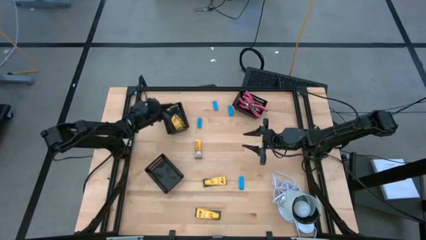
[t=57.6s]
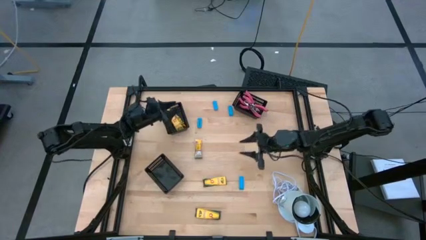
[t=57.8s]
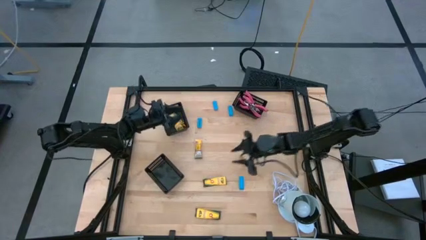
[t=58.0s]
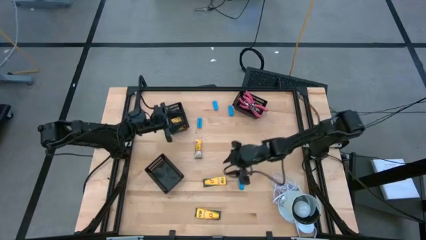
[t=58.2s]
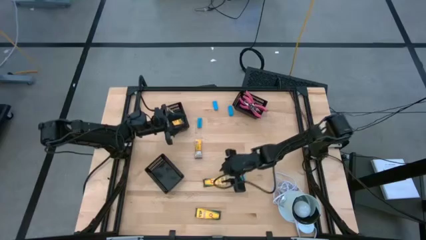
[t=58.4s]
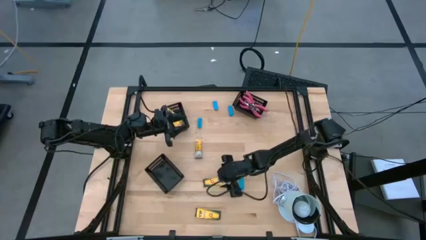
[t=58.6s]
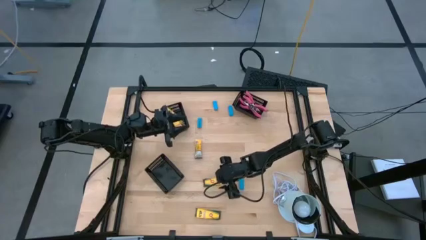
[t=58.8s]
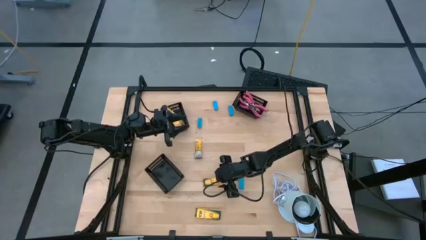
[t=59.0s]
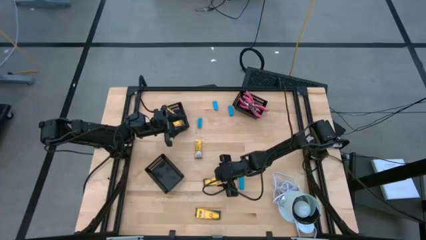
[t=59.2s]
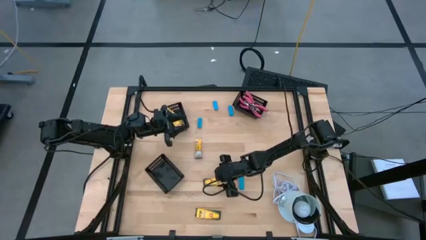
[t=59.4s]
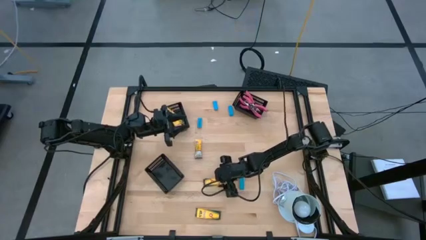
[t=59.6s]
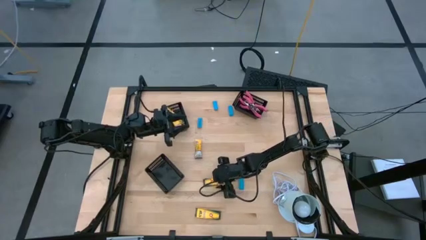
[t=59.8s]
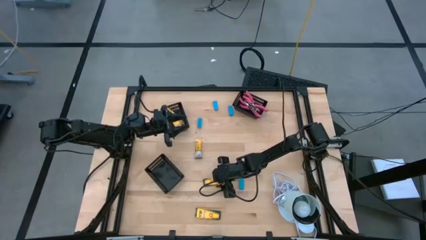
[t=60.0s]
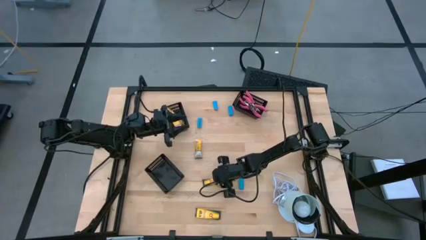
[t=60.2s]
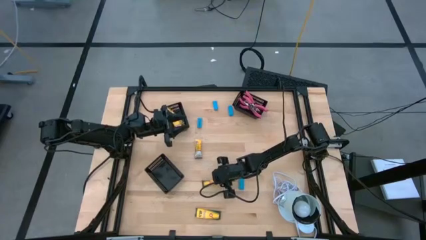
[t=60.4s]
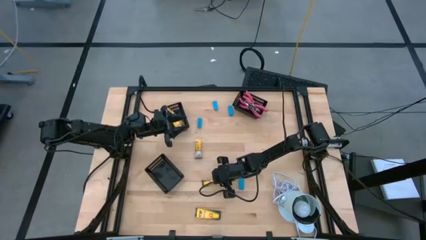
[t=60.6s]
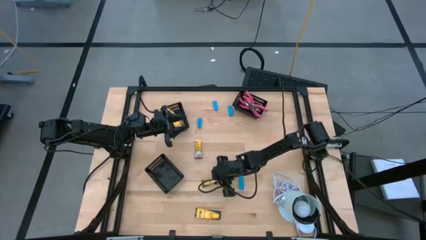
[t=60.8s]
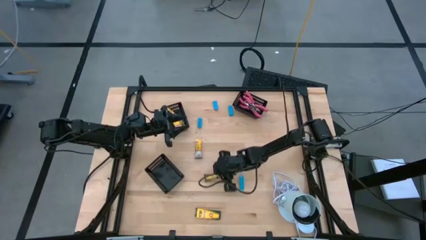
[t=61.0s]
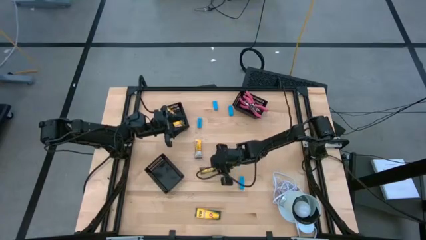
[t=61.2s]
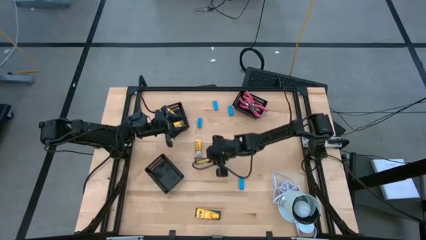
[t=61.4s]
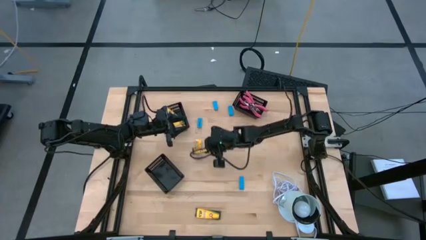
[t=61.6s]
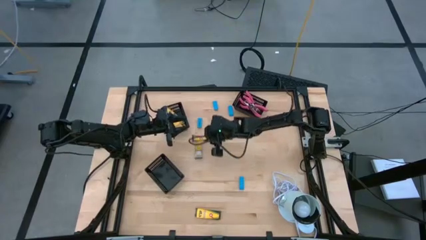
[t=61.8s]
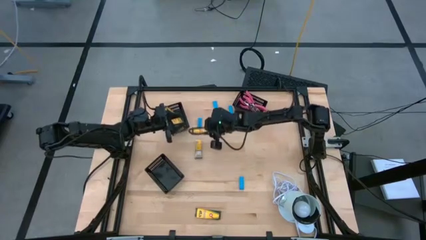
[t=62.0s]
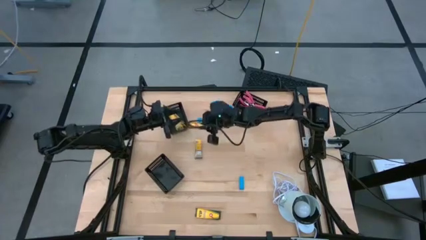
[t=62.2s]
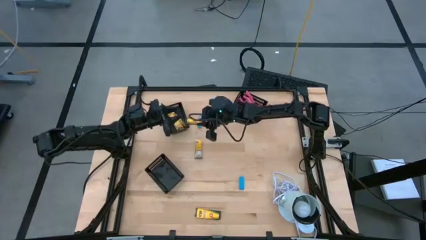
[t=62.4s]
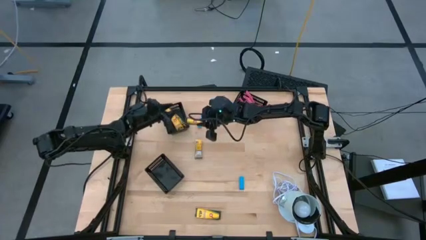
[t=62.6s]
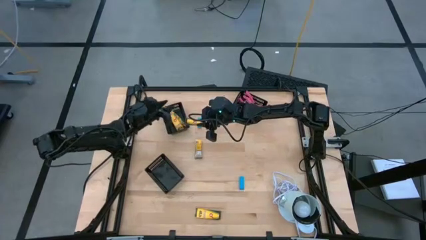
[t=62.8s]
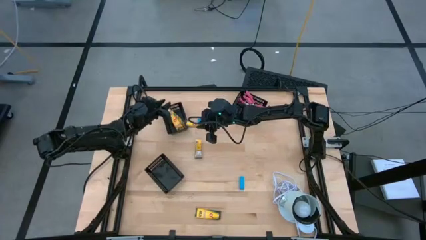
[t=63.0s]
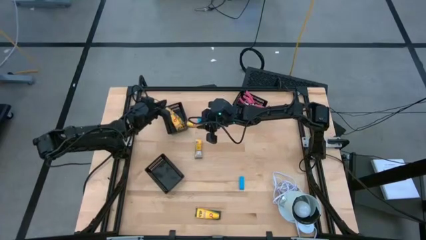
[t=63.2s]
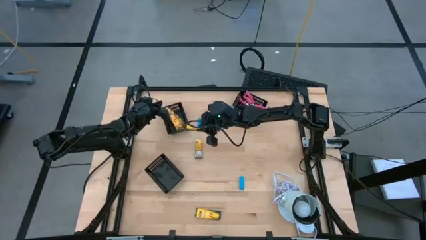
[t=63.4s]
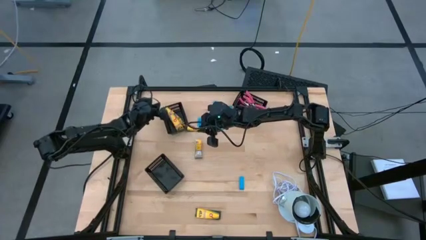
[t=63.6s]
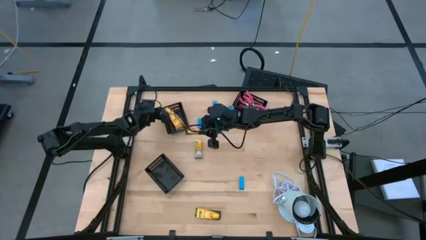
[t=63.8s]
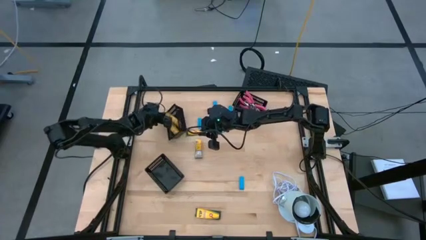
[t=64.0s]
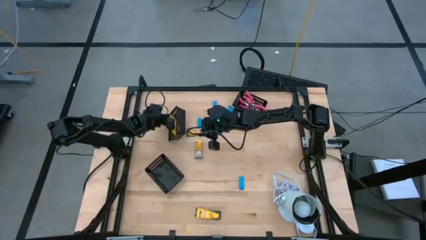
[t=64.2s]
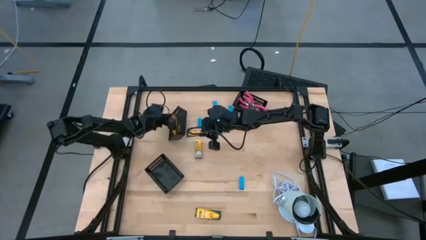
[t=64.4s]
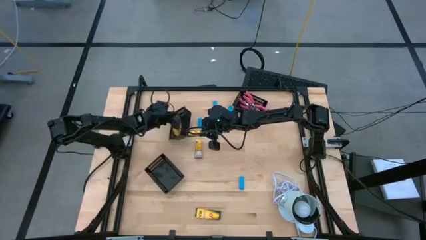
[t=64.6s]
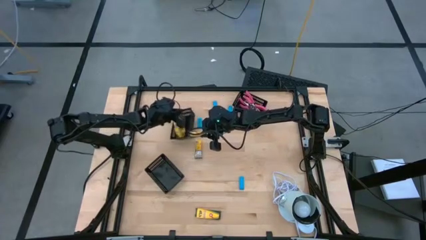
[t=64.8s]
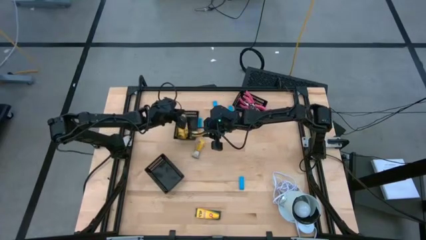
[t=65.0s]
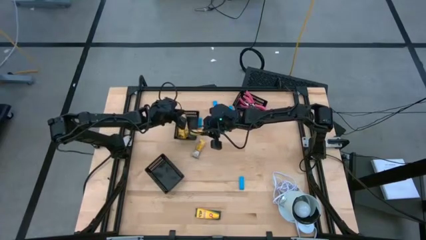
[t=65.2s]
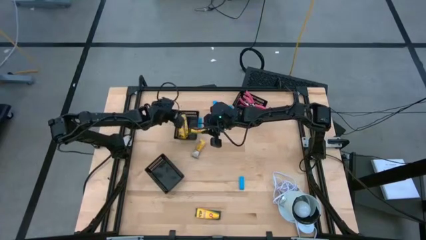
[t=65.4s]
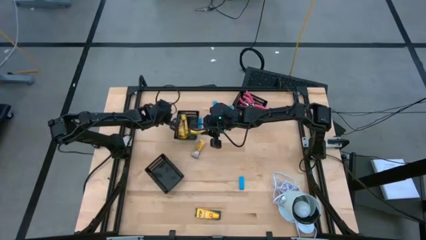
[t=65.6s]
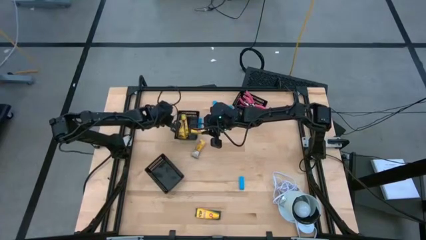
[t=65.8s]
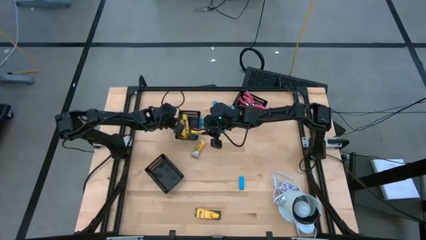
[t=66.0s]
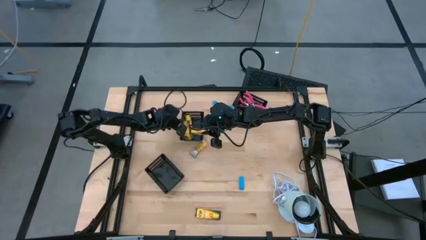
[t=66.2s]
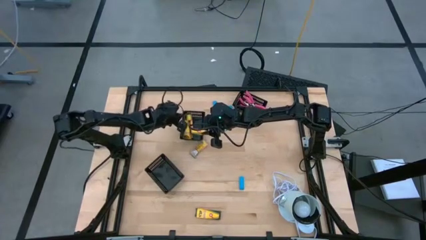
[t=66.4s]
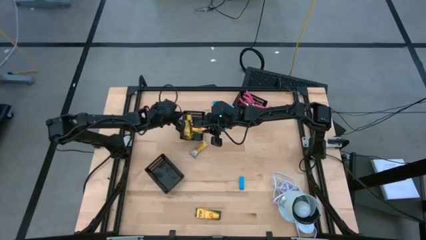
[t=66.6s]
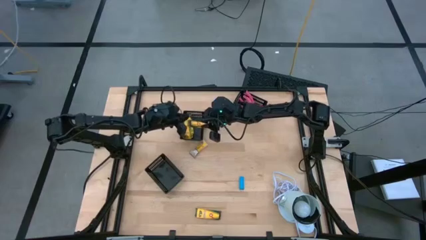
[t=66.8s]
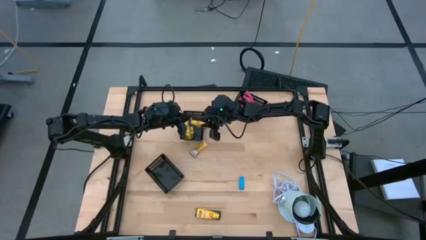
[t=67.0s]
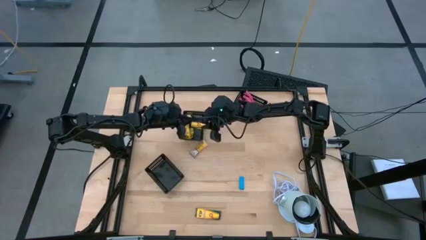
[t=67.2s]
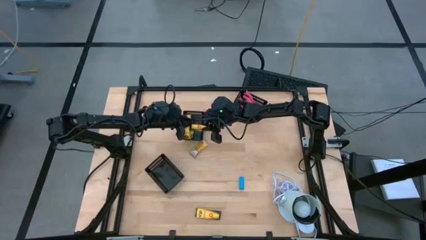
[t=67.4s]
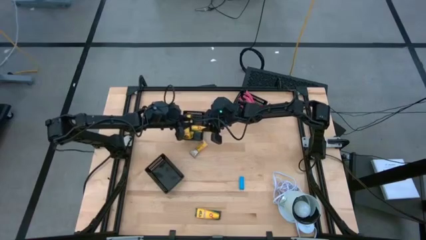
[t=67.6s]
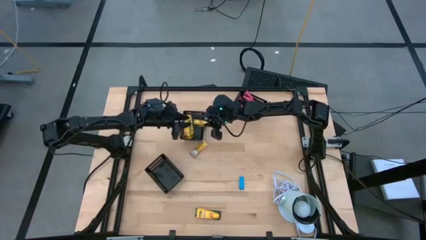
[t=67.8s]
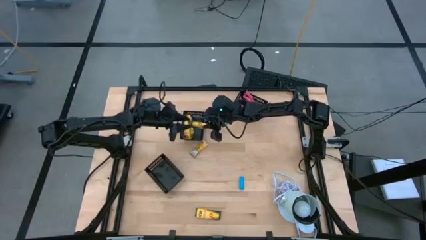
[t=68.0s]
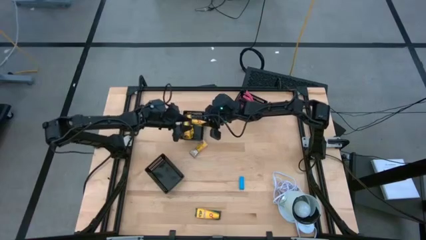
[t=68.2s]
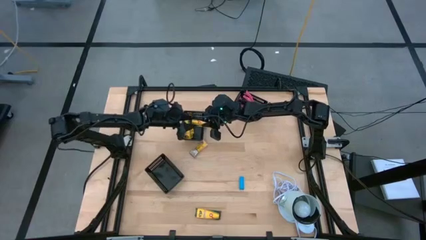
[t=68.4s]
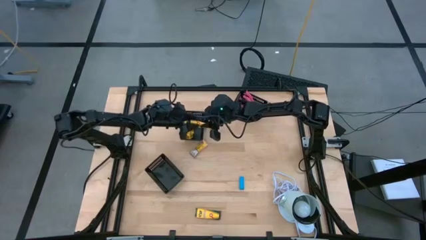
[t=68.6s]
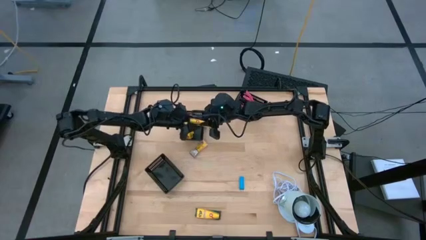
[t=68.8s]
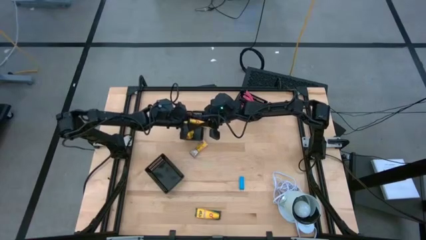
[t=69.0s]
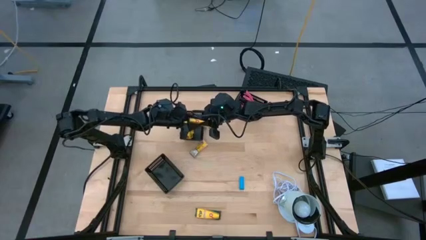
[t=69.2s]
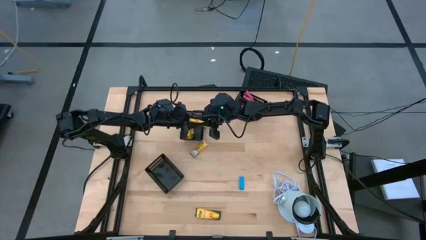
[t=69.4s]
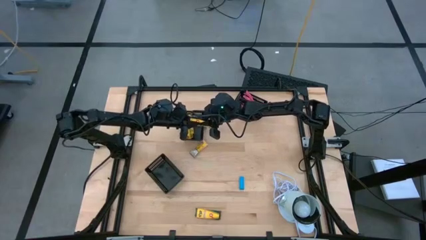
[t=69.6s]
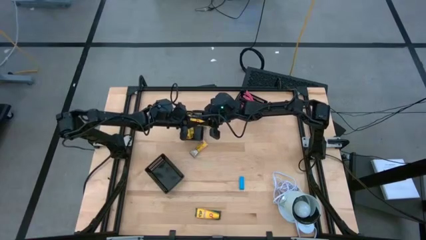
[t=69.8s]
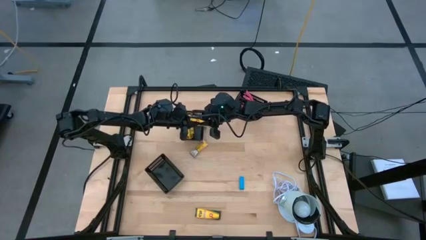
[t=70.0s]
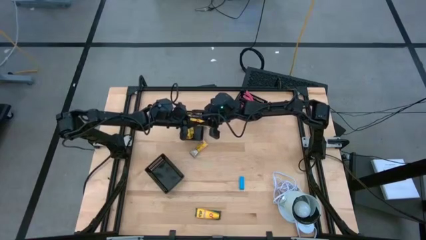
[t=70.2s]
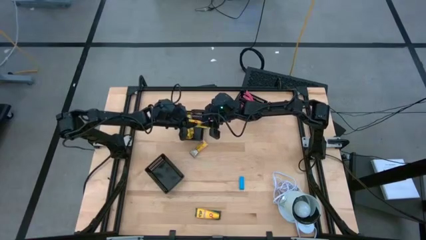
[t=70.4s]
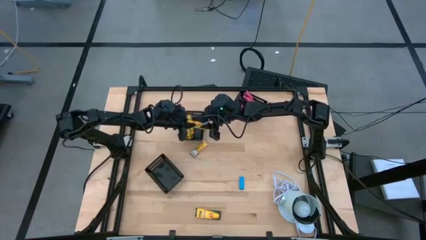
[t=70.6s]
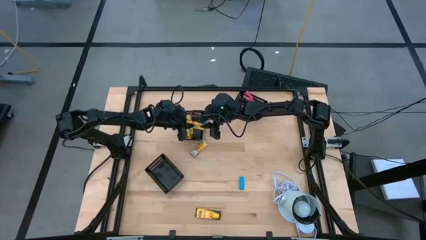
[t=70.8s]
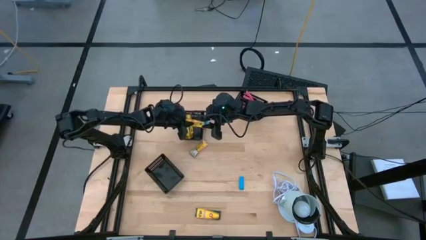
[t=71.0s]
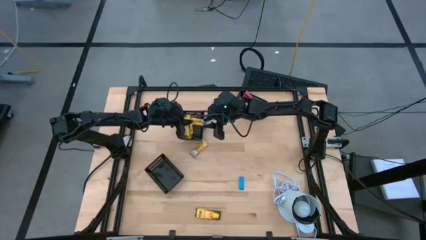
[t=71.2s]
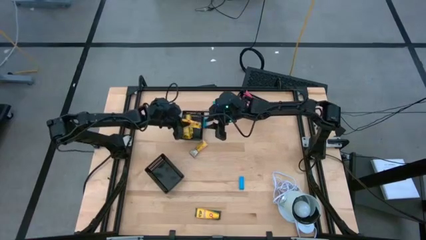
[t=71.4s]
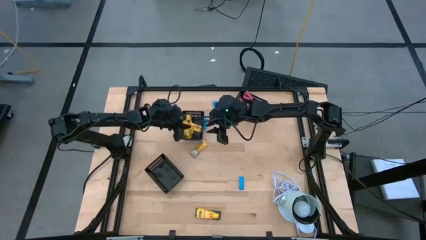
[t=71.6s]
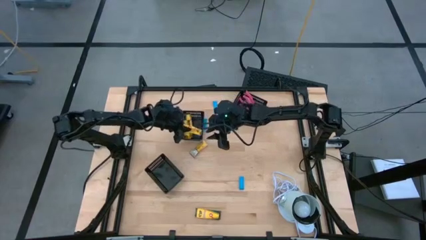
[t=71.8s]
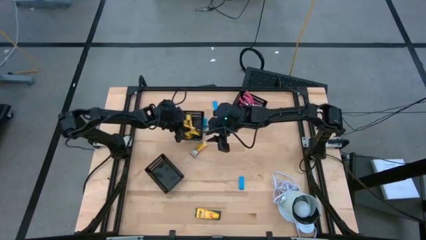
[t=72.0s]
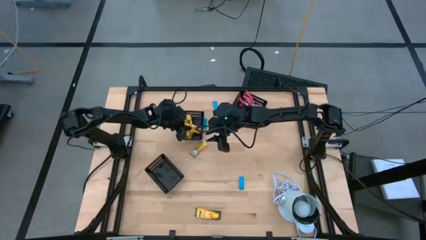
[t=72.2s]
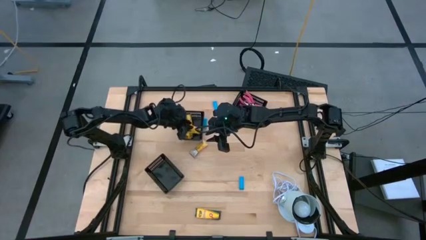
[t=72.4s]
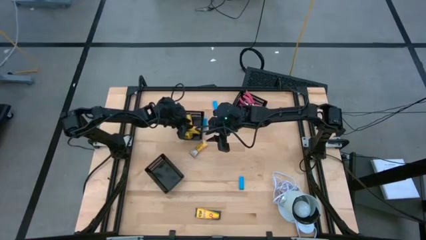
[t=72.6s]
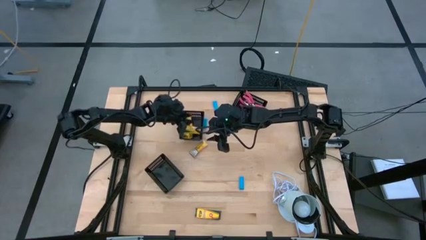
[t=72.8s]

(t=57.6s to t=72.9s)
Task: Pick & Place School Supplies
Put the yellow crayon box into the middle black bin

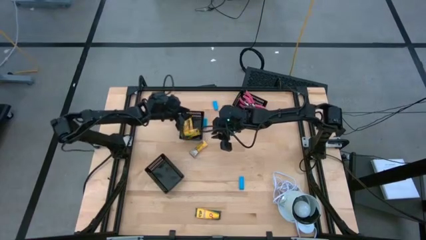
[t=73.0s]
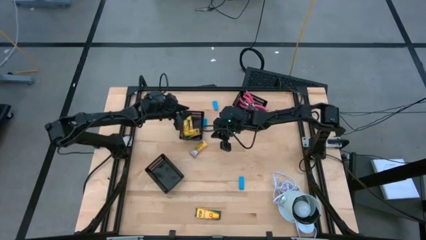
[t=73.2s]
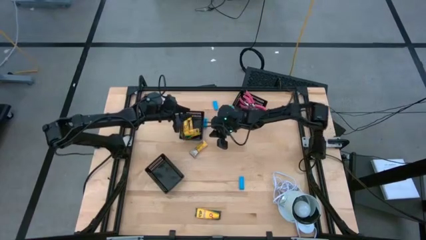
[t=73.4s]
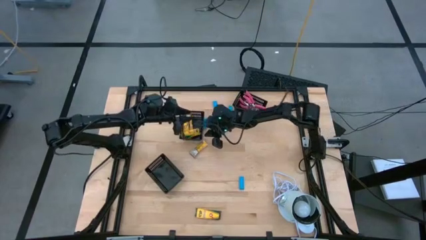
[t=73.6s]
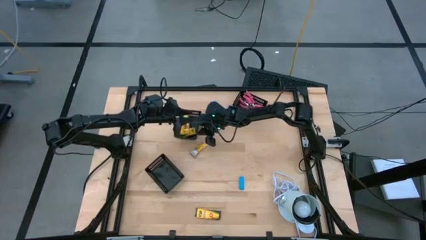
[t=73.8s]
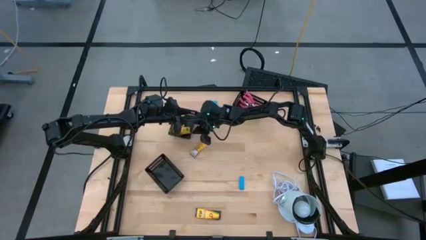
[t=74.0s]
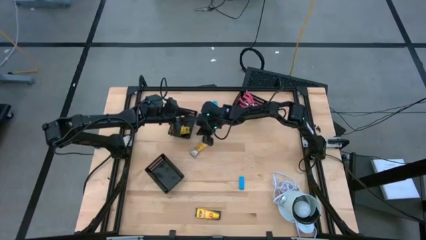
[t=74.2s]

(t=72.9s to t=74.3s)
Adjust the middle black bin
